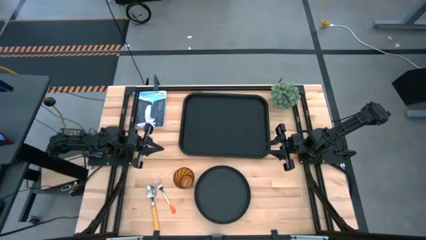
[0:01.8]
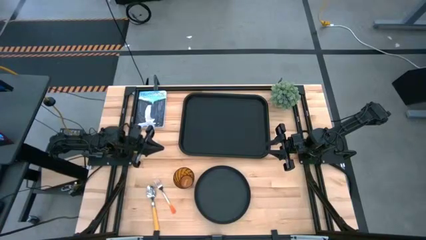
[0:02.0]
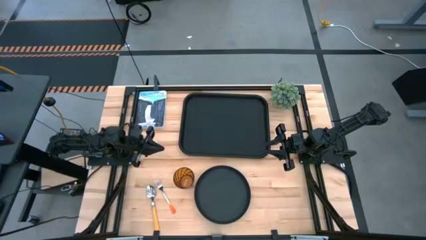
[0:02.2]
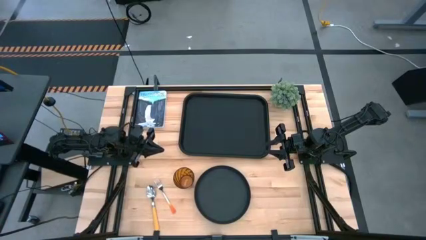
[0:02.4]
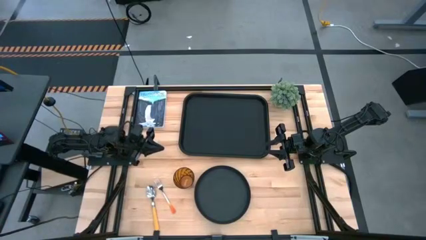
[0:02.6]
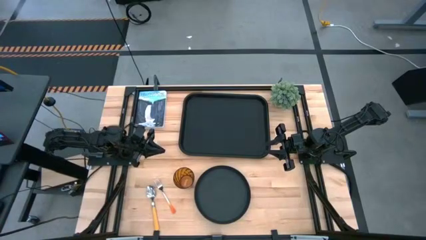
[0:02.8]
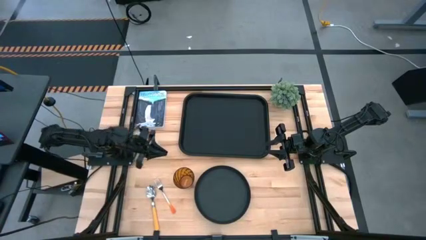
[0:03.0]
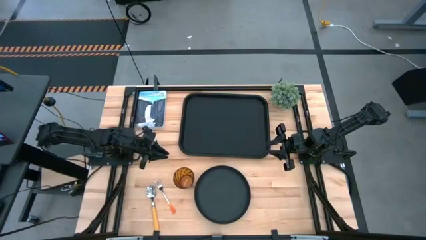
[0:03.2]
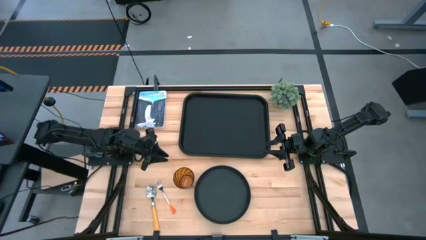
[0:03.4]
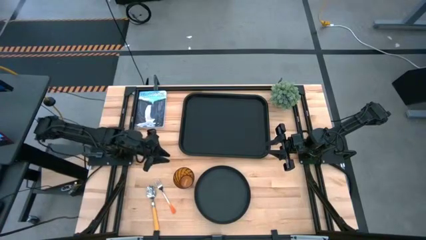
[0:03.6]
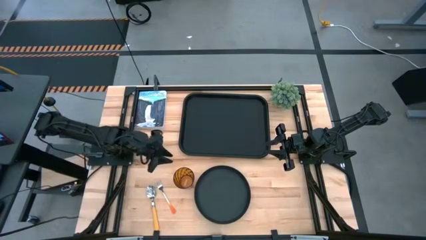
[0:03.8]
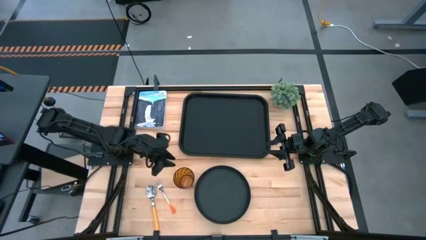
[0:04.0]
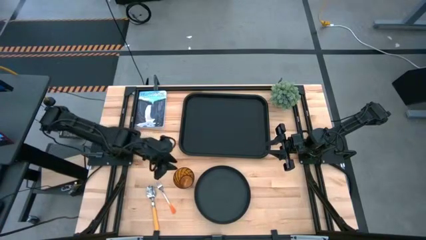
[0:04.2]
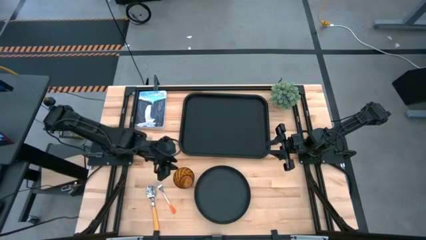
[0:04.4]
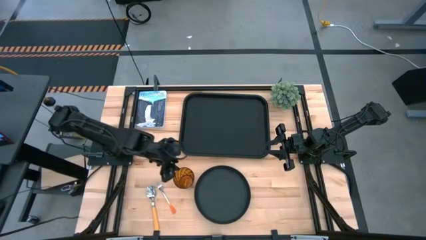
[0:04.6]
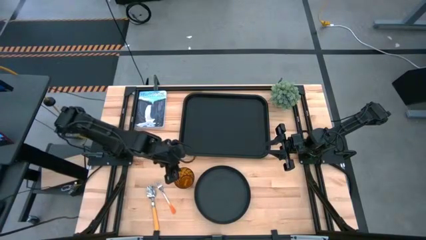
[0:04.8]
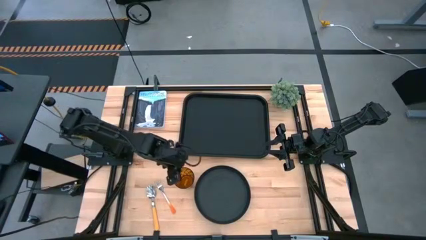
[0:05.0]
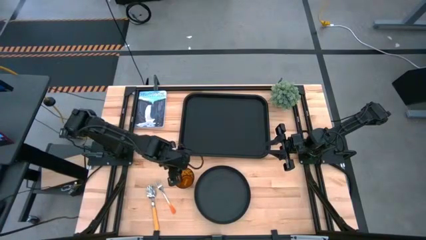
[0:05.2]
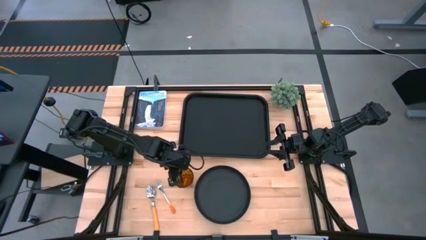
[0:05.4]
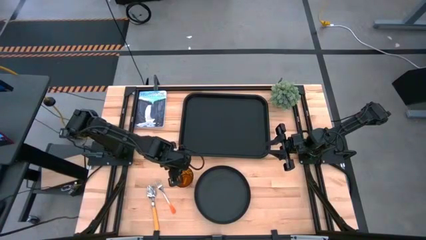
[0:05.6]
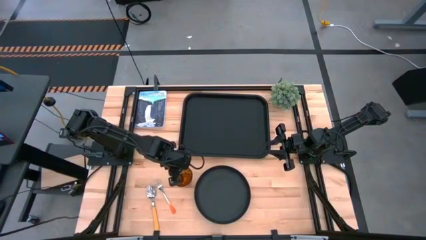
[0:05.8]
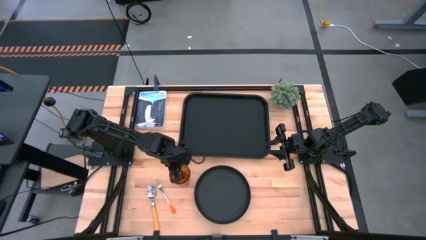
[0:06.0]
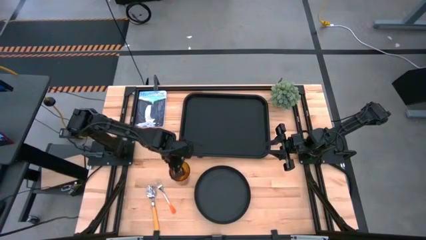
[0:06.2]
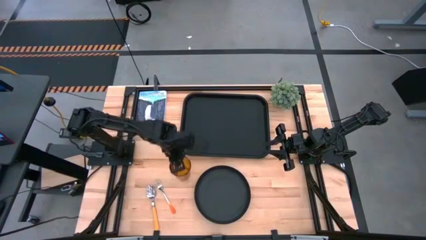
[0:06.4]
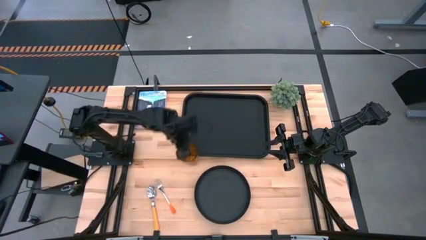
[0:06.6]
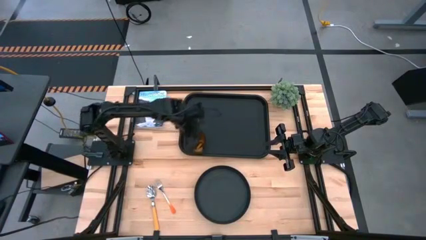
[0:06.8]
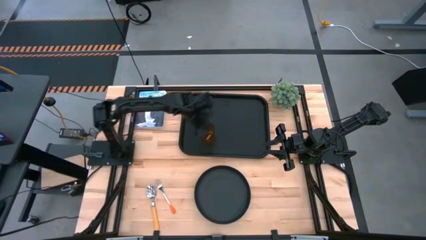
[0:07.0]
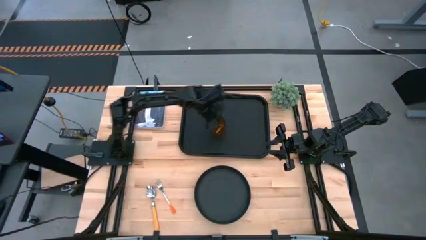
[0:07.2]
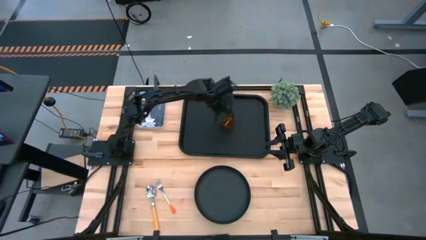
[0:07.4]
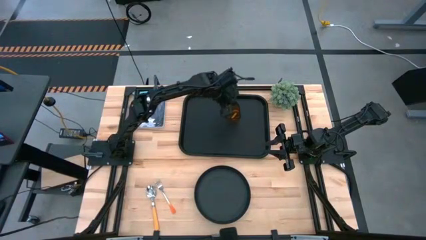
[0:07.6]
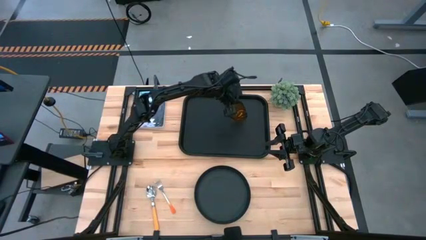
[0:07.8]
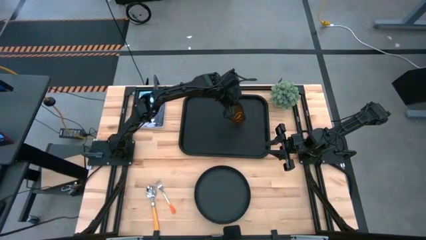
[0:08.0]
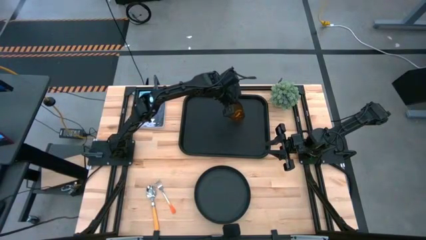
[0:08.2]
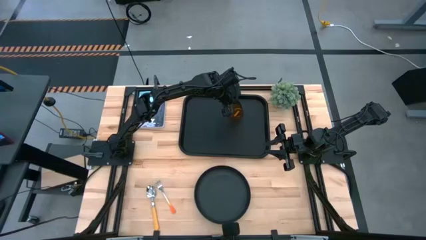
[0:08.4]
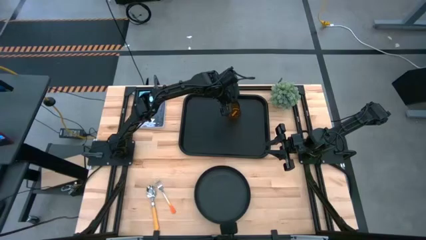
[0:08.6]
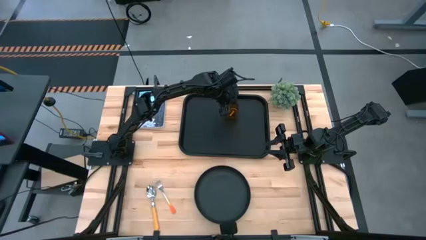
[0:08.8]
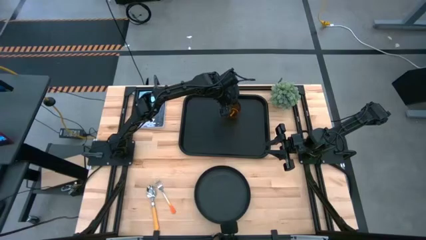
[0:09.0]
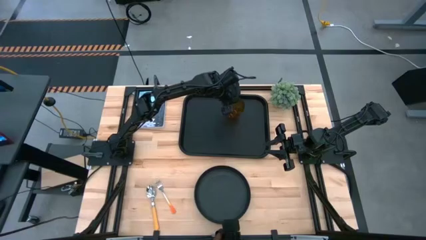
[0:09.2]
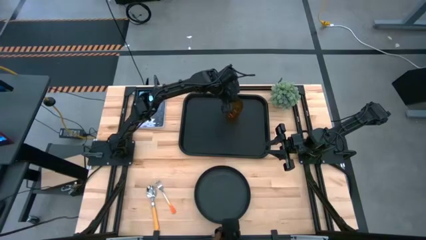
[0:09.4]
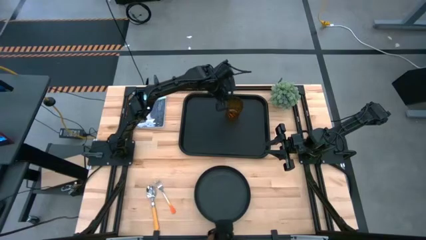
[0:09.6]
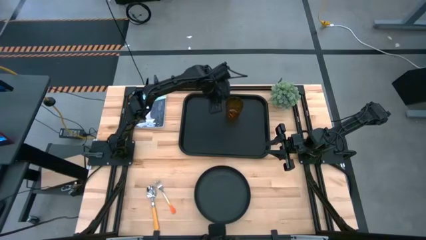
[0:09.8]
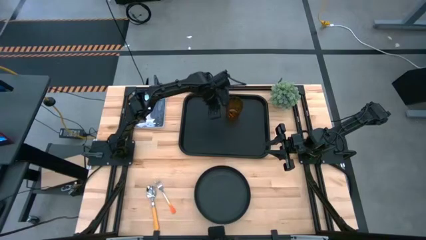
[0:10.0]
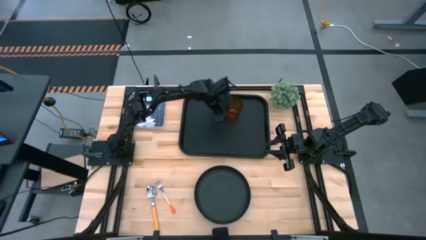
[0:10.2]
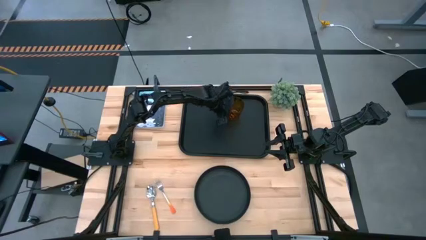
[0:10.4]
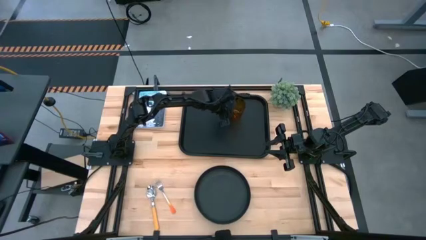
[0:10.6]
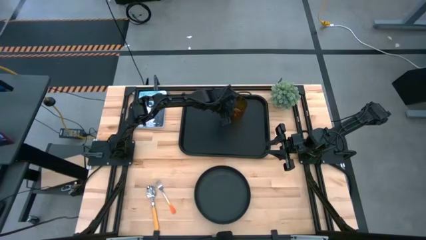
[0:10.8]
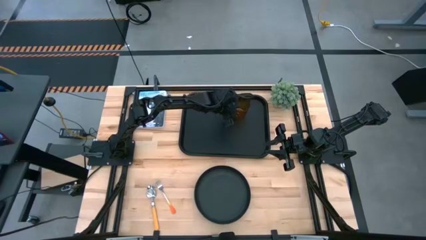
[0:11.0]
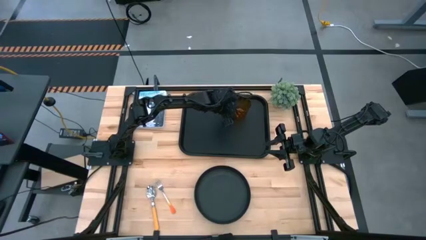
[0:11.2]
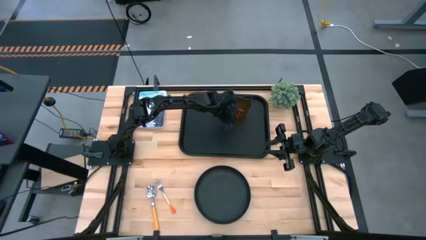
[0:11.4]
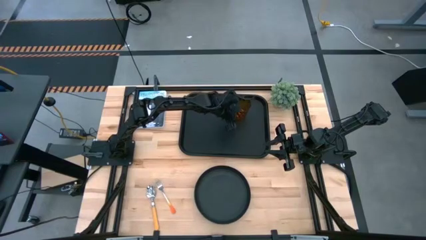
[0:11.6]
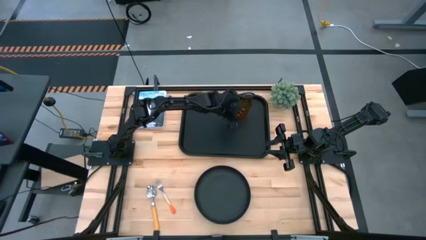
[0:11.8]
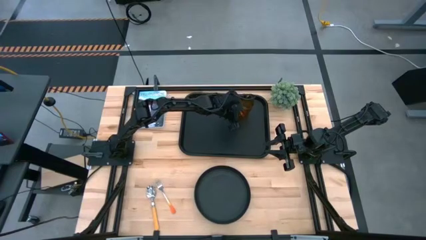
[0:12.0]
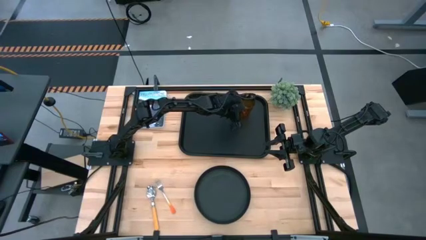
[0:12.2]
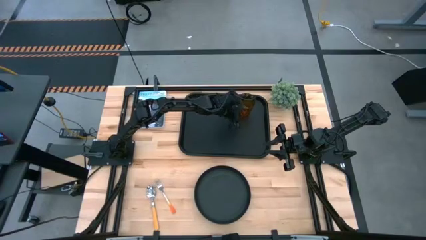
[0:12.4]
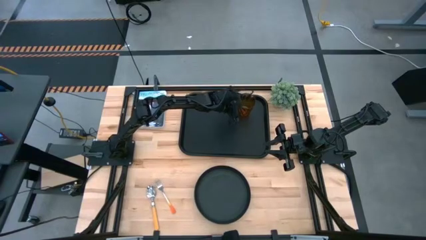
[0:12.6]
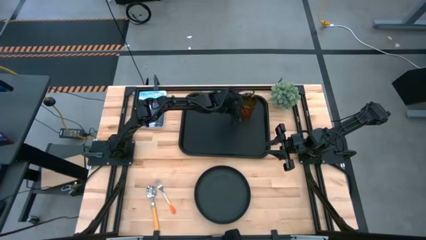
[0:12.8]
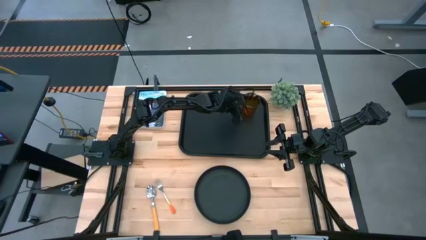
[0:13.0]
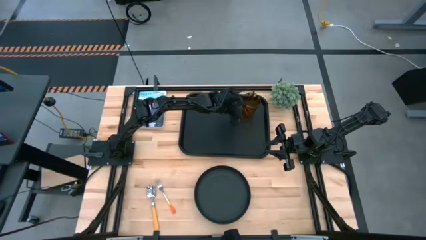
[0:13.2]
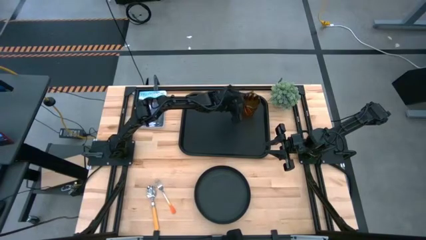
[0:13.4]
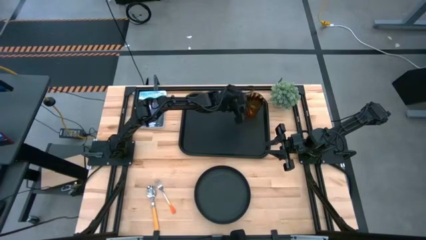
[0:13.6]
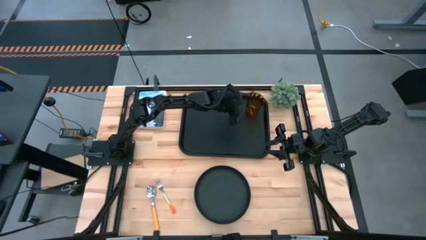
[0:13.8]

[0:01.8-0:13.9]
Task: Pick and place plate/cup/fork/spoon on tray
Put the orange cup on the top right on the black tray

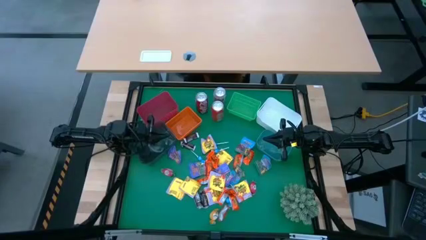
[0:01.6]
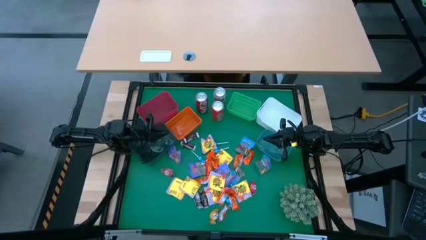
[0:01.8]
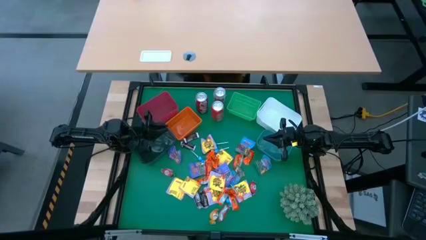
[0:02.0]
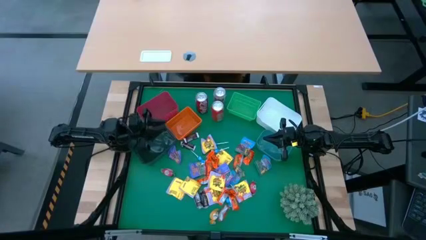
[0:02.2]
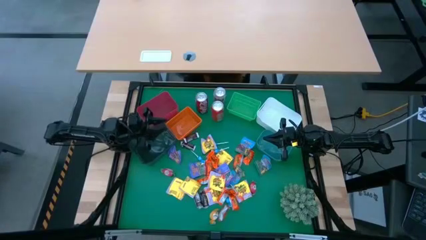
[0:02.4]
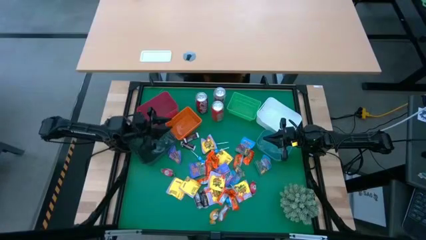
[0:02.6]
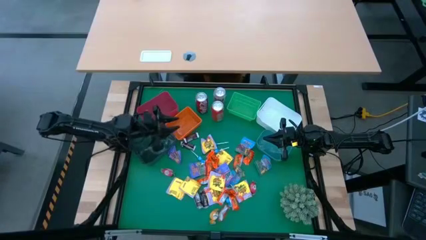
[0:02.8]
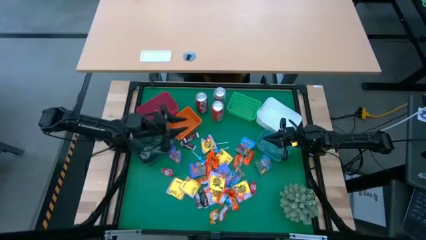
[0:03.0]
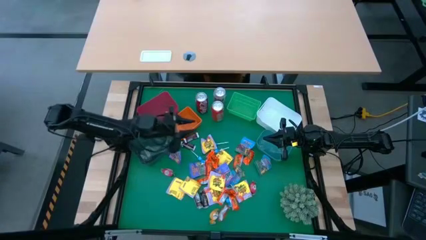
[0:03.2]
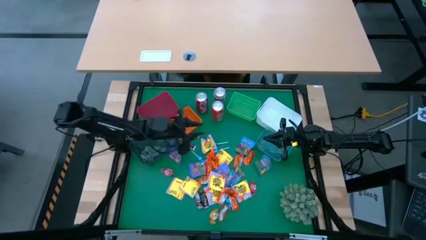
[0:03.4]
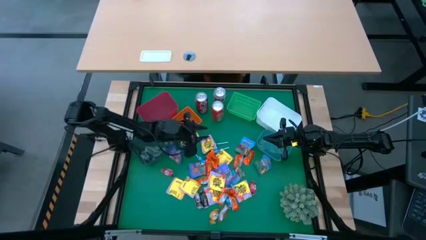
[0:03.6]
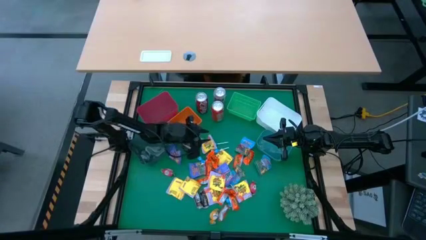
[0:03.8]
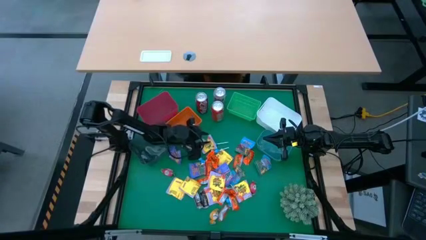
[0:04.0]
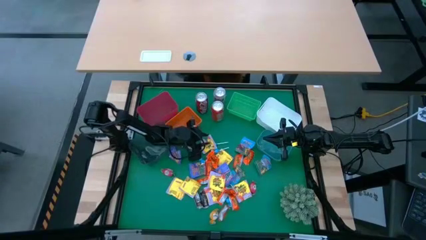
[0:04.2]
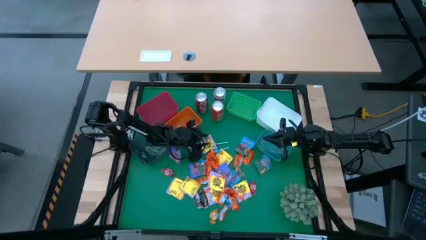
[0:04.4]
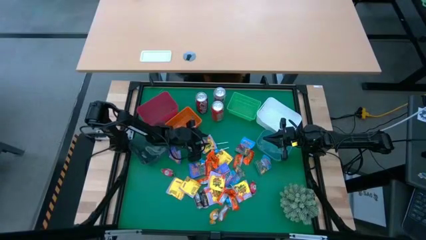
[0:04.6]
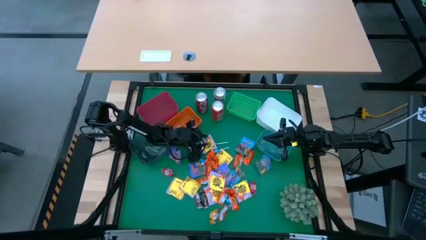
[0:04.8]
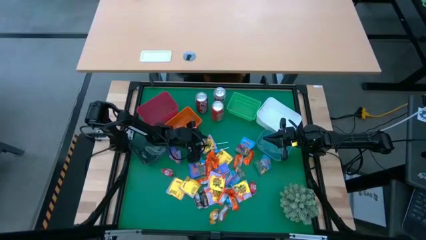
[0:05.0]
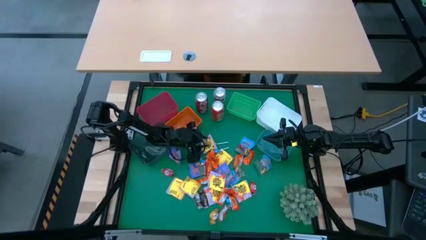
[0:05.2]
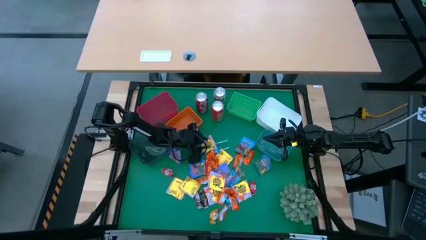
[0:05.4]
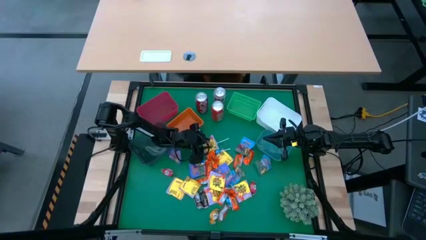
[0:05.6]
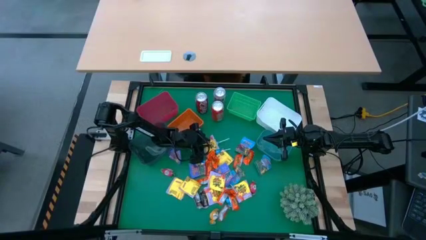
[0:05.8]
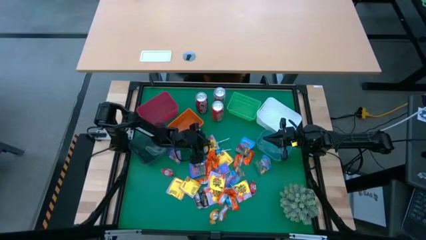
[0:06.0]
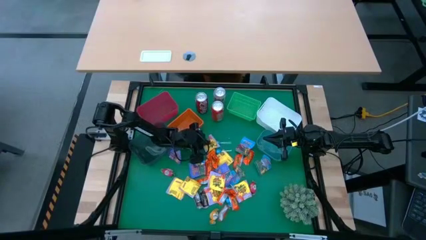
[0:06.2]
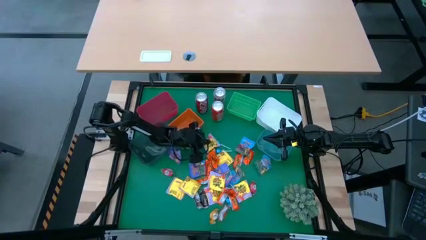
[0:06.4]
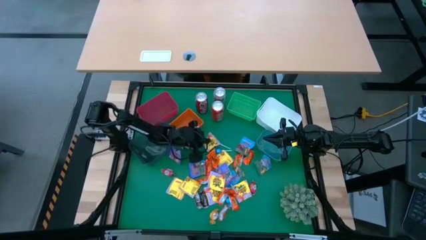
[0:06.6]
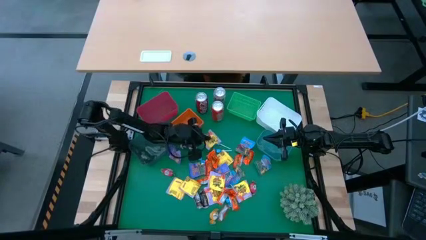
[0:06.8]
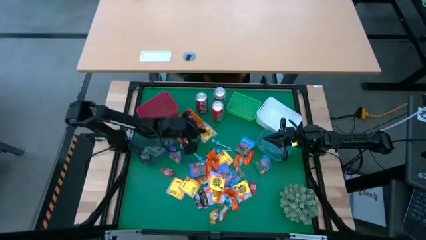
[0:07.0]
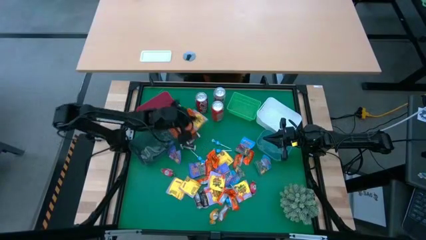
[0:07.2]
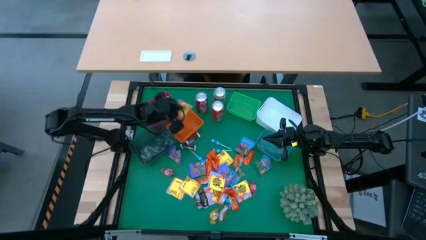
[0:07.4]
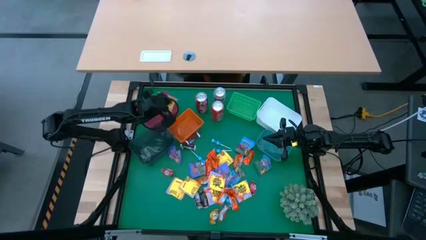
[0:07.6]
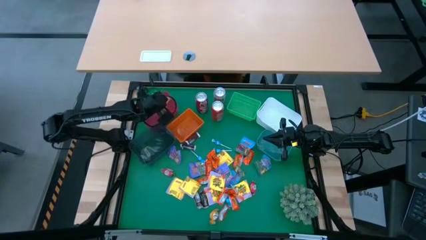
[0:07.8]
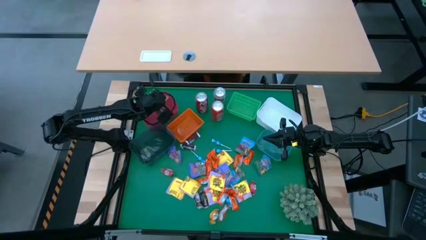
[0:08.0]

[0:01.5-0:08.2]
Task: Sort candy
Put the yellow candy into the red bin
